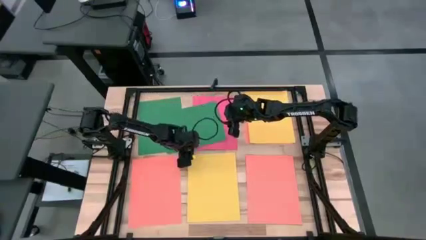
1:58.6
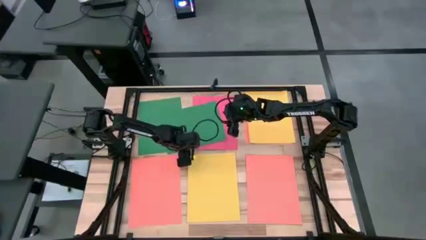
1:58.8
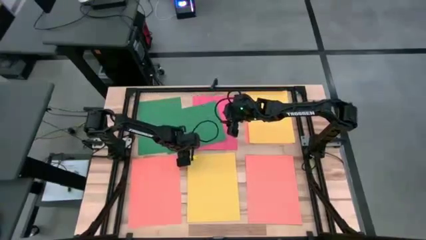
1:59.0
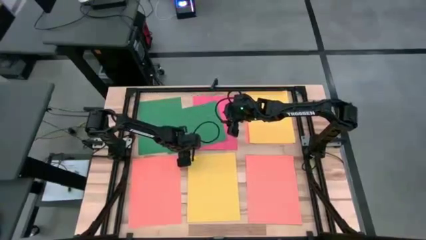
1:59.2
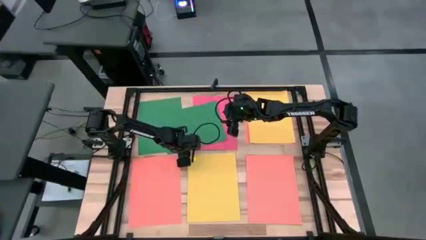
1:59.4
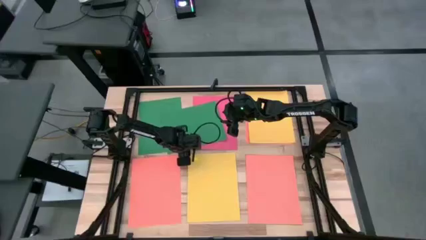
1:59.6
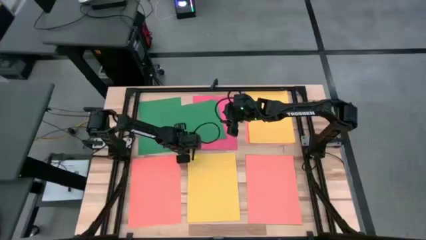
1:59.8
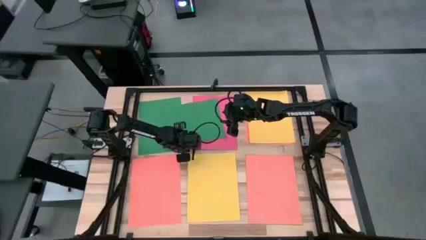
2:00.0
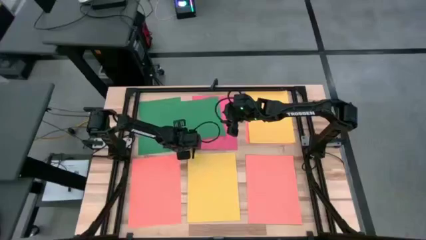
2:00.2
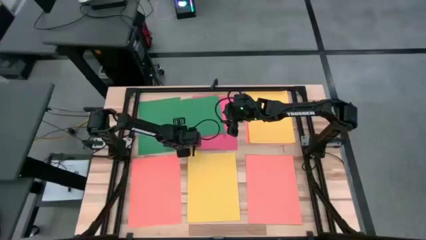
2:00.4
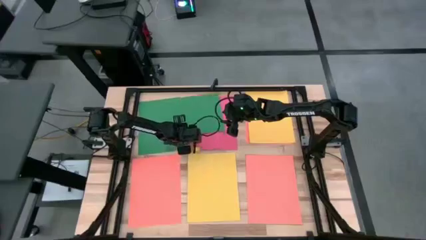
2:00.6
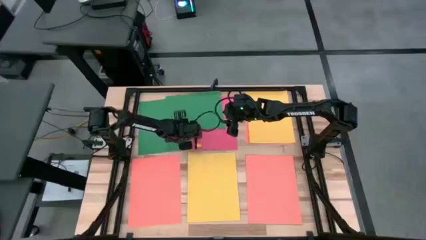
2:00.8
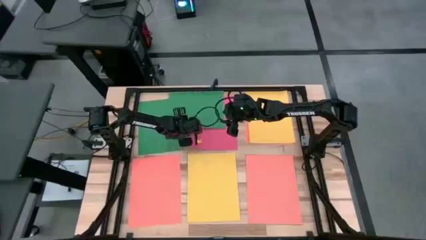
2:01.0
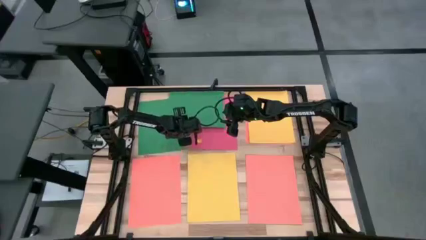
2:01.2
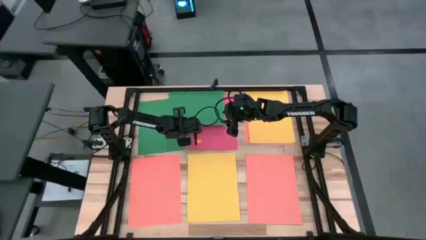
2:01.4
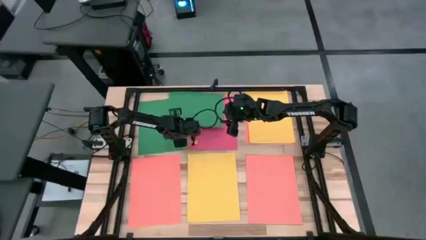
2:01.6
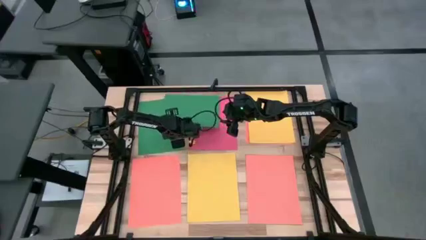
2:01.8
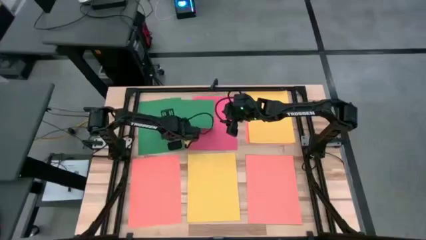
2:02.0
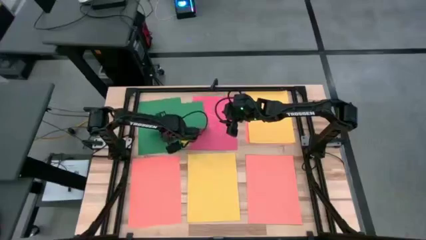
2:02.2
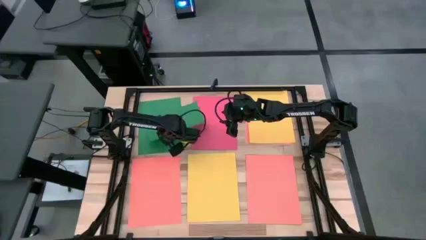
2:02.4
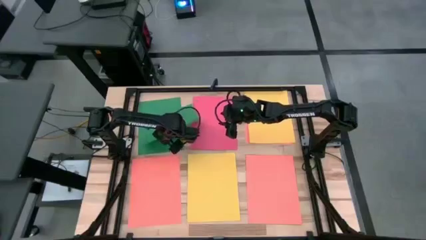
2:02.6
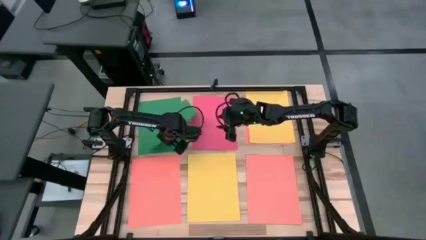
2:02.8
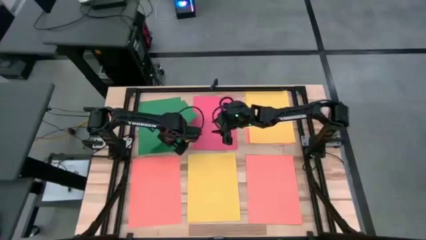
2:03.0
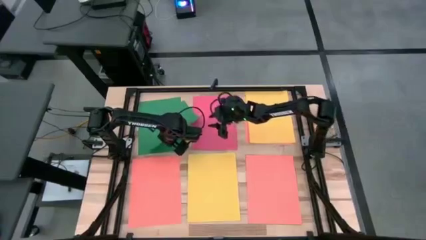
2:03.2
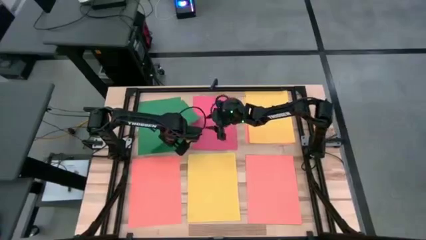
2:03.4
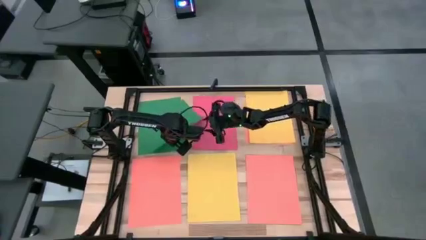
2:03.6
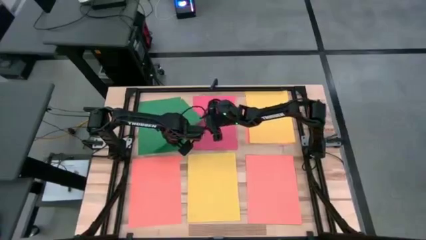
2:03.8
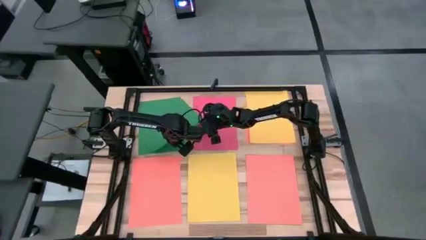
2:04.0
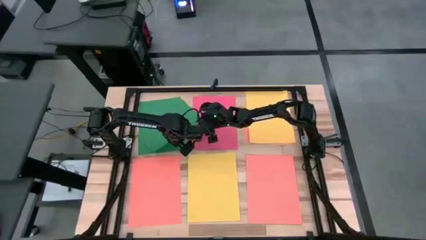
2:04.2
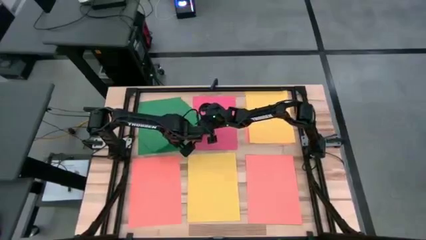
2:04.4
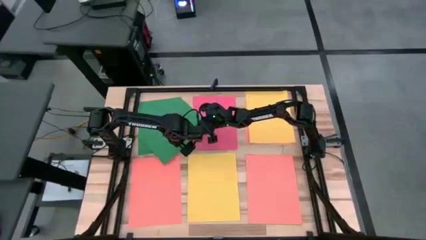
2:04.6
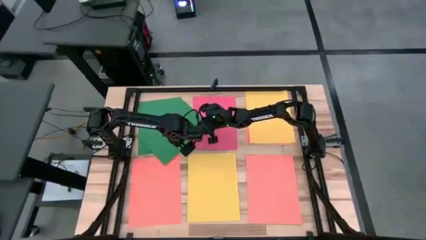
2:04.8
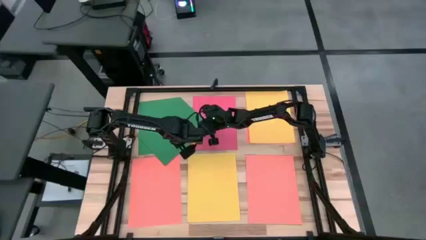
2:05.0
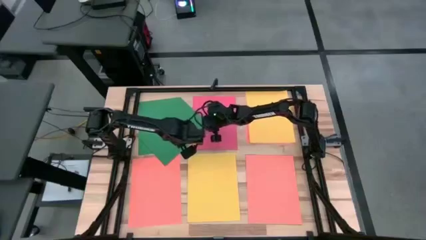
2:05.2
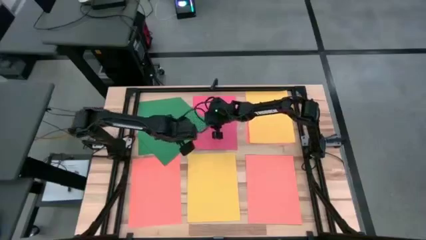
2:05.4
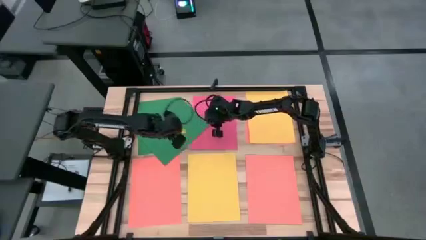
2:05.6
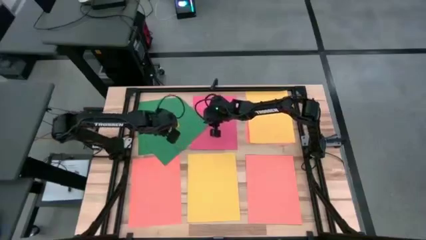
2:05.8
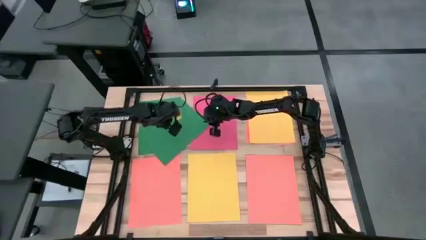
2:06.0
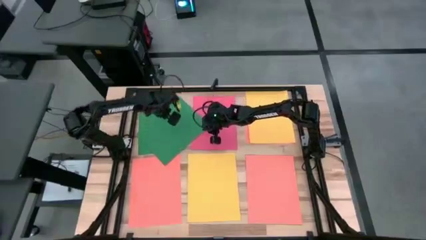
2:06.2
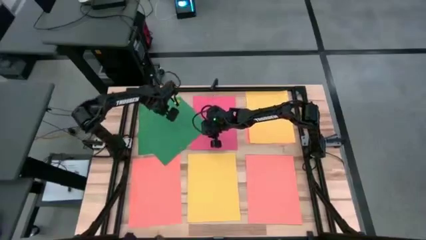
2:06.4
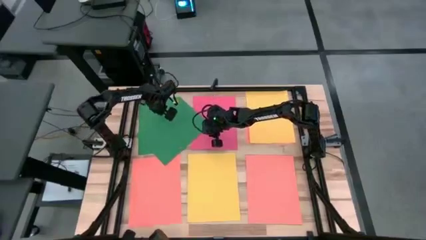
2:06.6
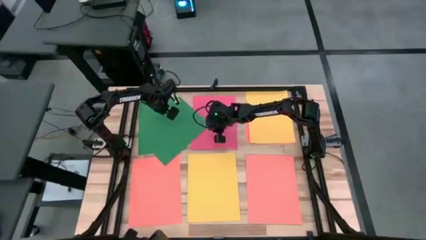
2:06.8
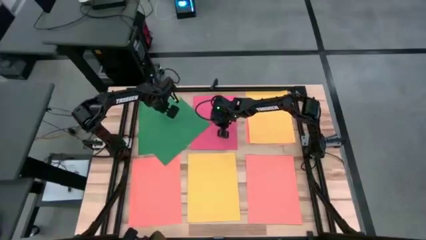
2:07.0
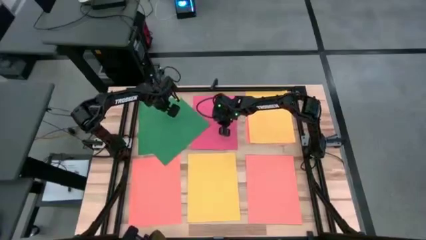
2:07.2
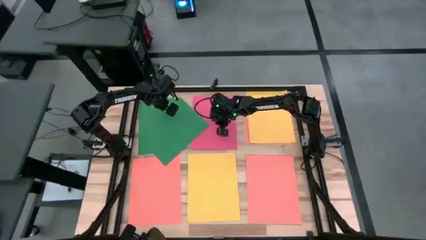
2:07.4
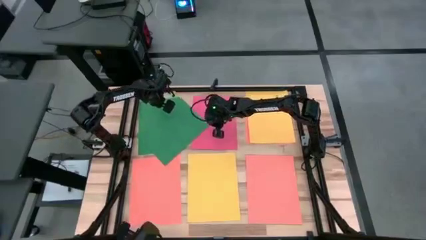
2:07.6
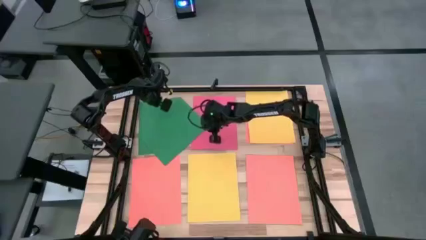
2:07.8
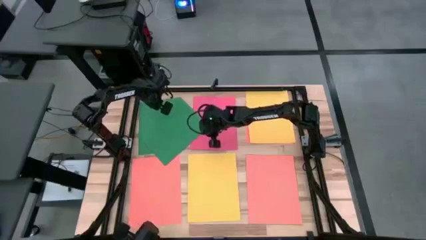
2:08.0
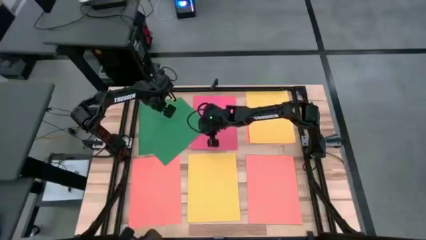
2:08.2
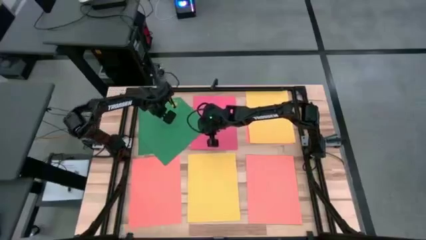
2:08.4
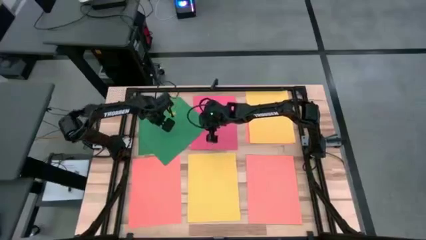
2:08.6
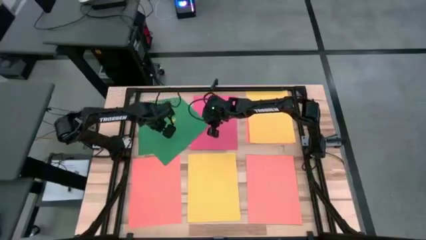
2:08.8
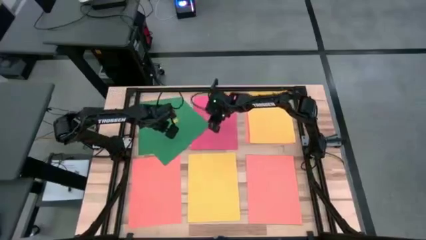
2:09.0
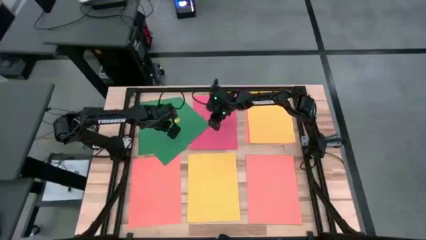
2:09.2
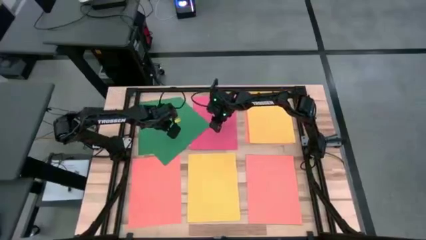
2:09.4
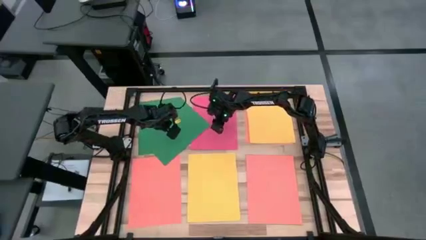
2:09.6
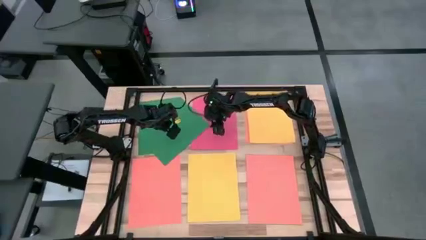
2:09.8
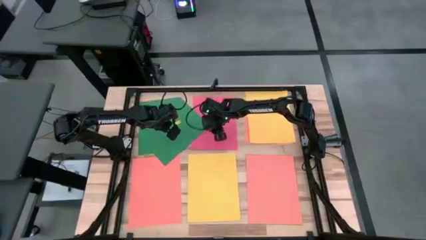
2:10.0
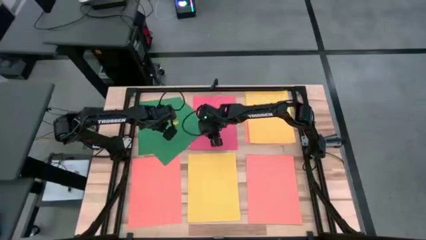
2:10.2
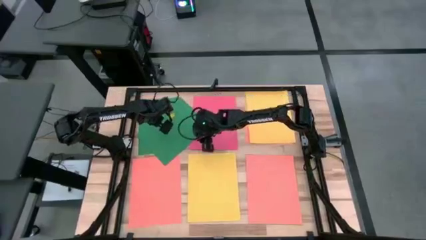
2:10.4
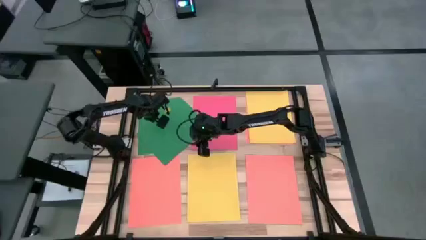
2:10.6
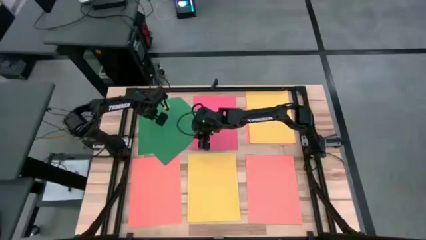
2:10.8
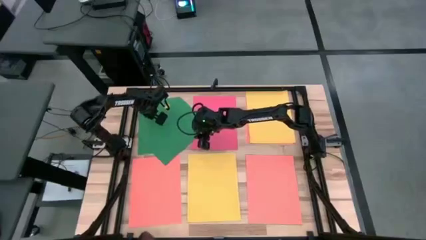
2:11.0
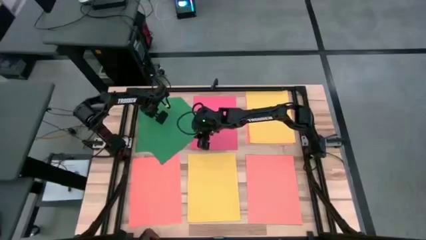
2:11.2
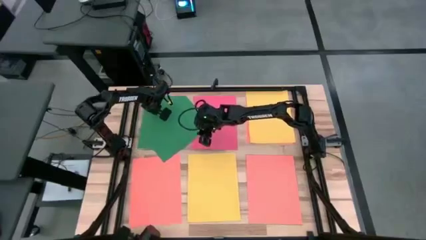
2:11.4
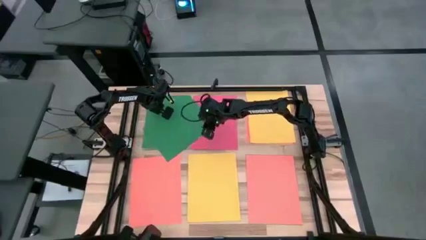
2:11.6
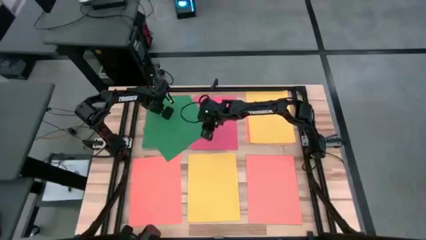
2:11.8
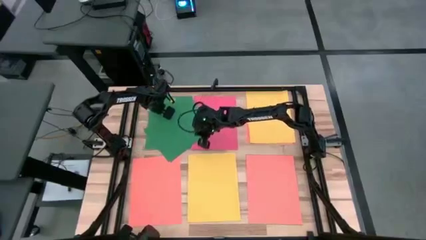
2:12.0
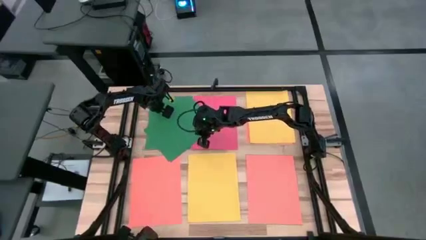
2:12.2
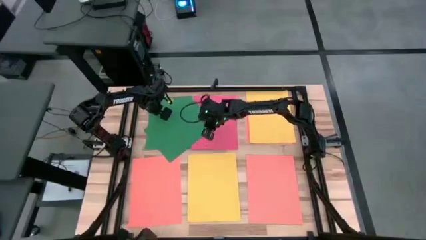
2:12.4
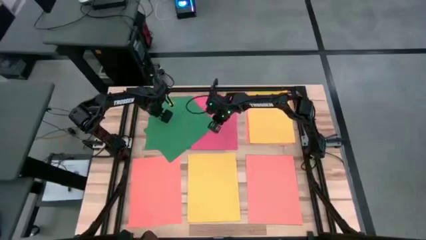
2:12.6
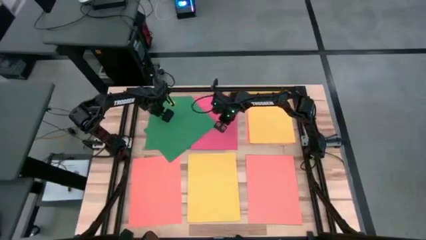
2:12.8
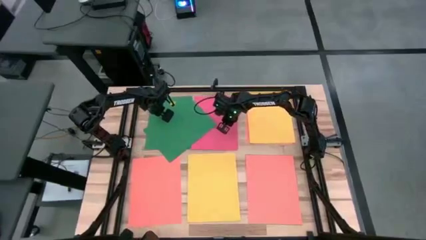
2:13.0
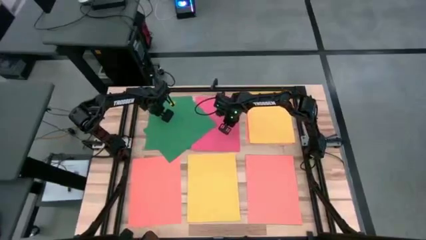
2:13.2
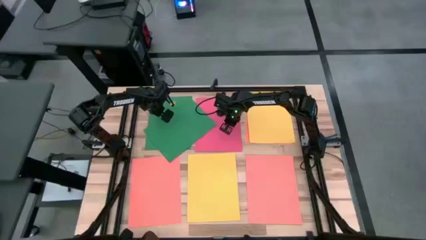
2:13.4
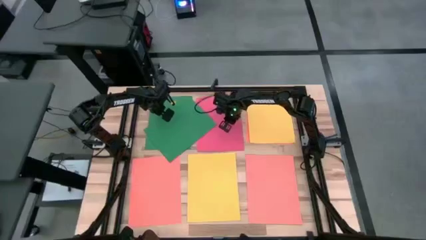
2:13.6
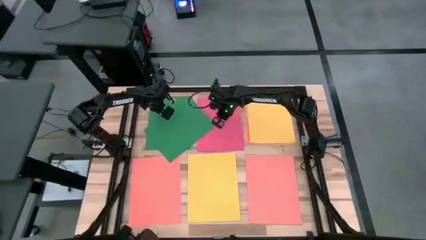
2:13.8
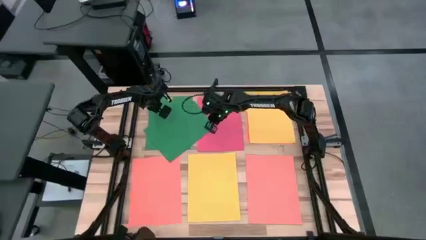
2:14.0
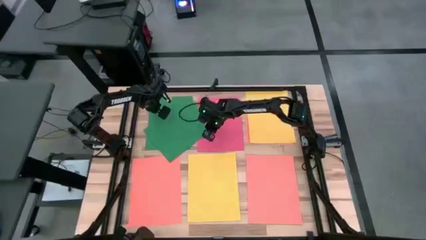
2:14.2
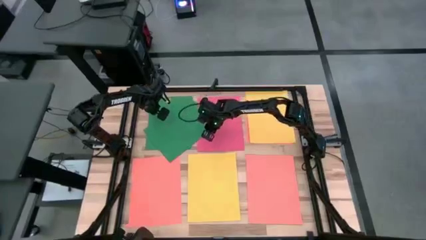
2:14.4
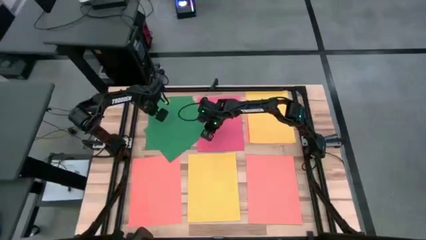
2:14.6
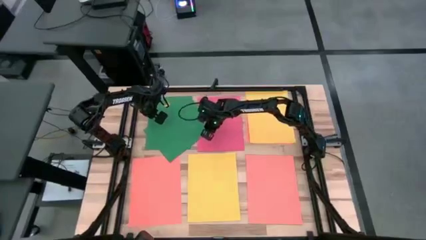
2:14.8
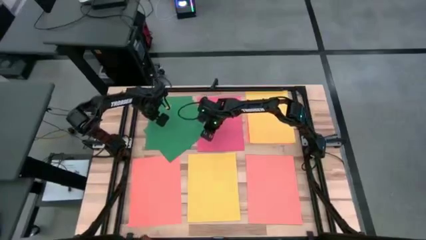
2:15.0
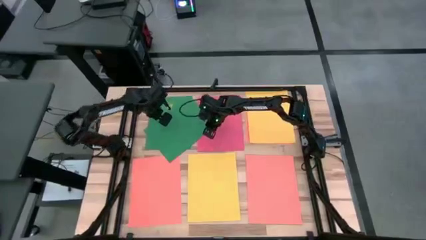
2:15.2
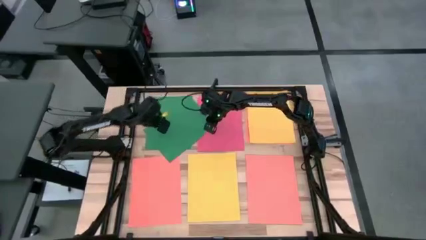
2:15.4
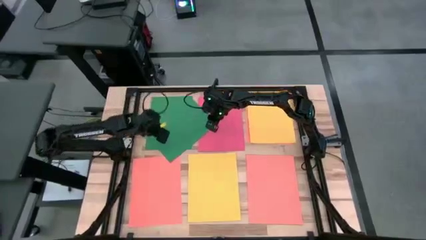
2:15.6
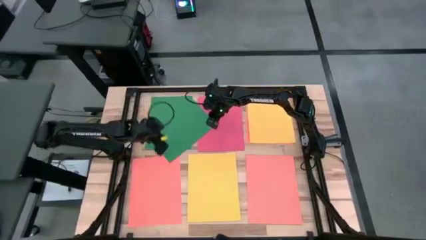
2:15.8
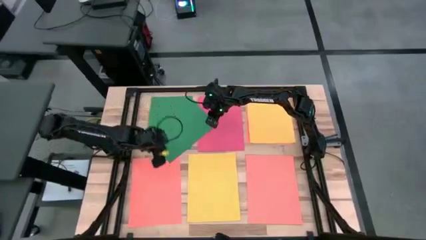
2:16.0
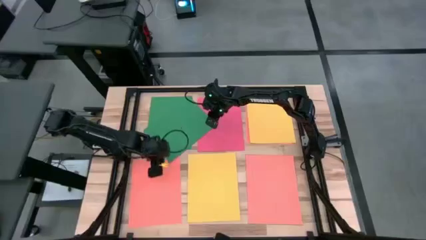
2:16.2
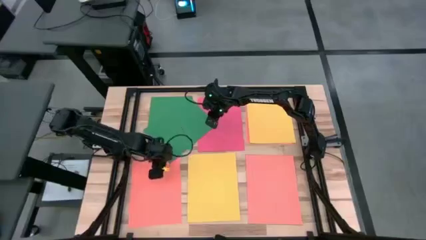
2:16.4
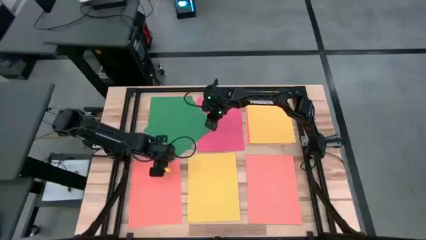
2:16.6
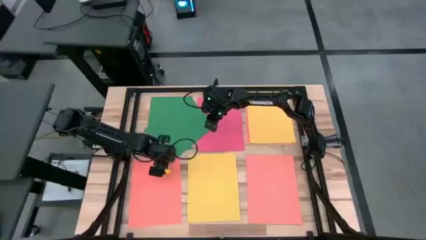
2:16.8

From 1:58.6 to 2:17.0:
Task: Organize paper
Stack the green paper on top of the green paper
